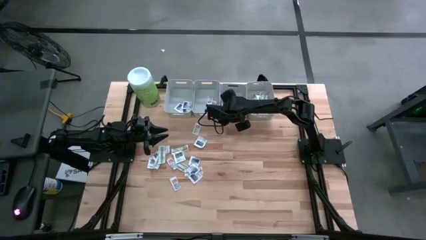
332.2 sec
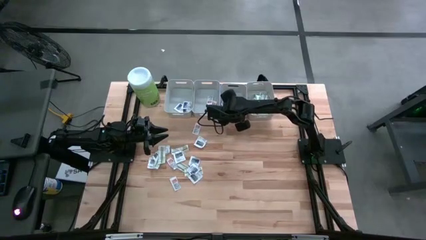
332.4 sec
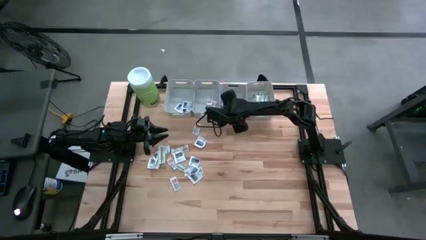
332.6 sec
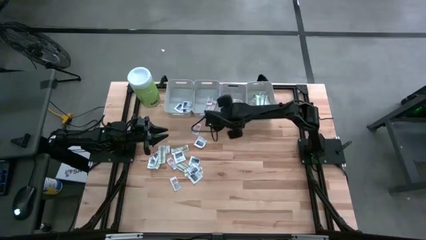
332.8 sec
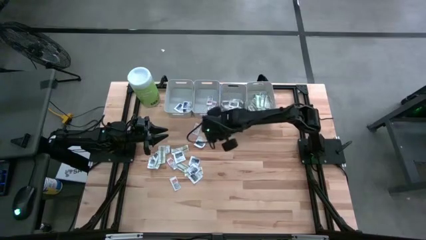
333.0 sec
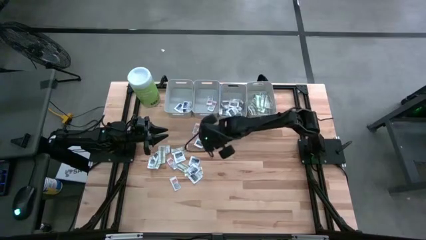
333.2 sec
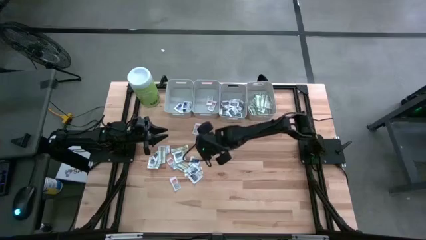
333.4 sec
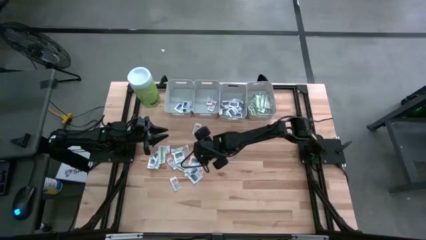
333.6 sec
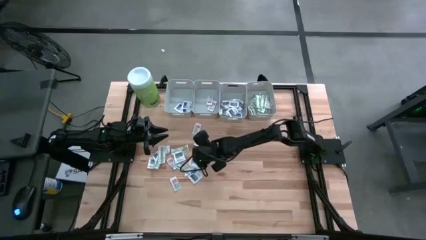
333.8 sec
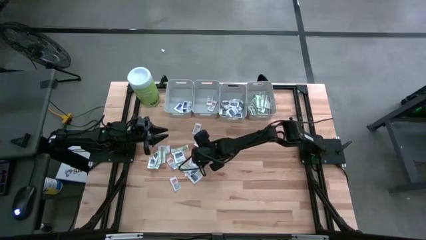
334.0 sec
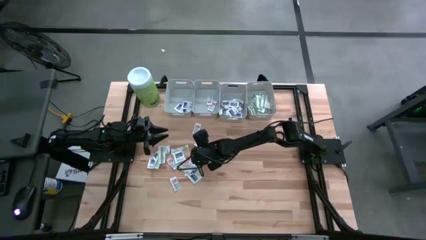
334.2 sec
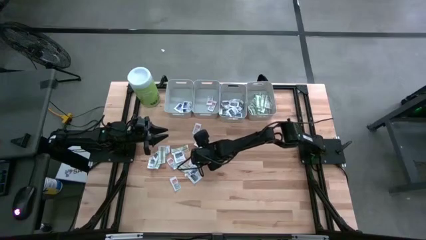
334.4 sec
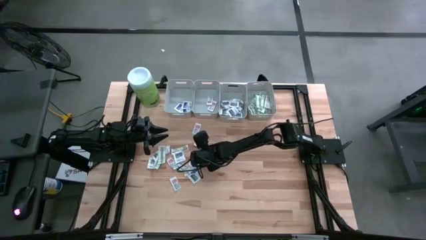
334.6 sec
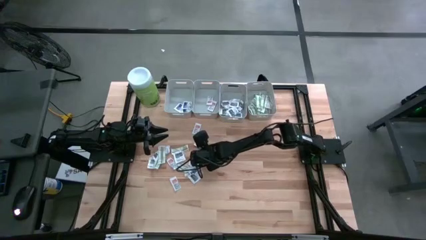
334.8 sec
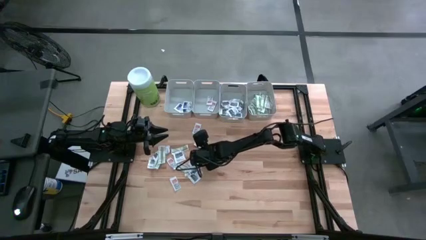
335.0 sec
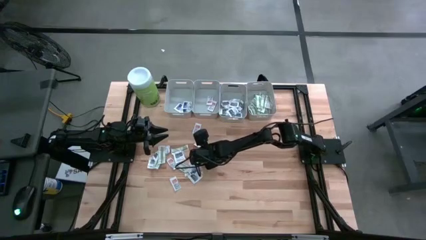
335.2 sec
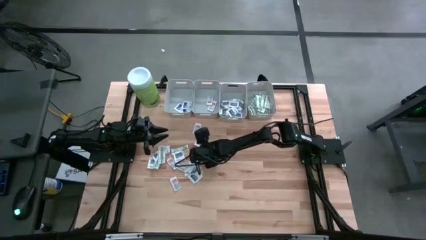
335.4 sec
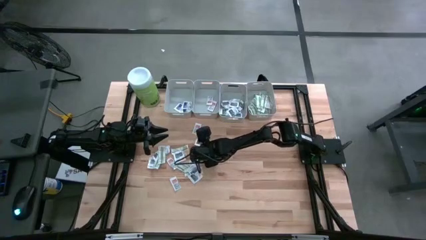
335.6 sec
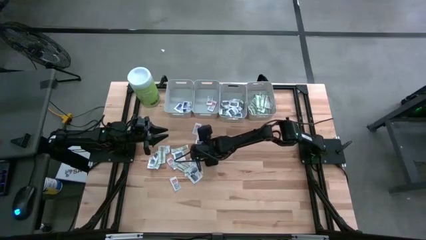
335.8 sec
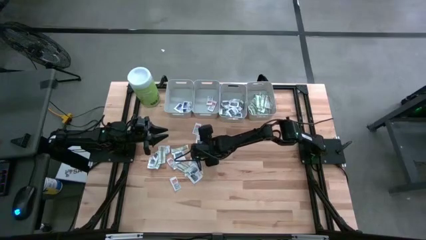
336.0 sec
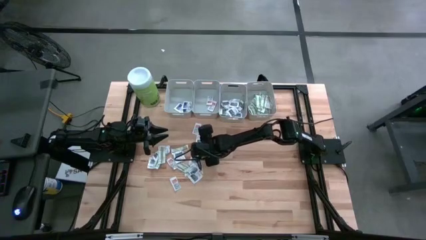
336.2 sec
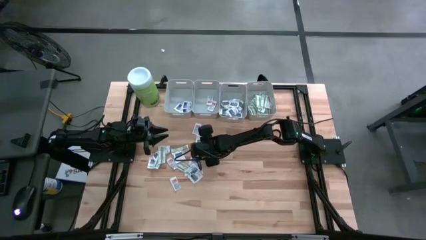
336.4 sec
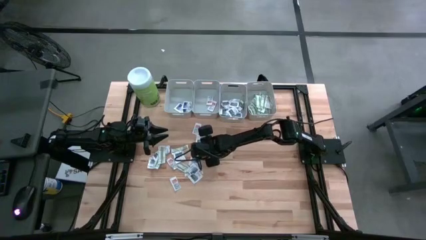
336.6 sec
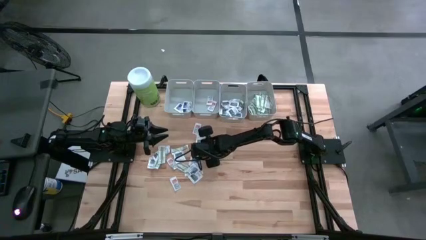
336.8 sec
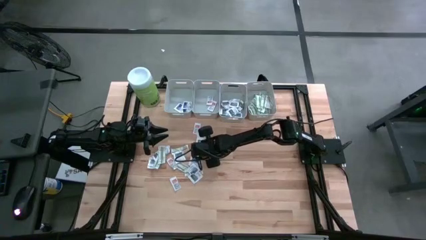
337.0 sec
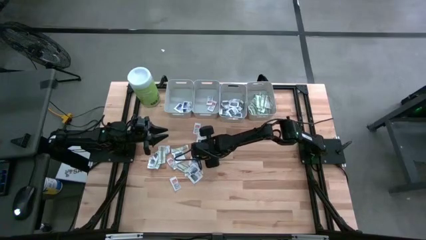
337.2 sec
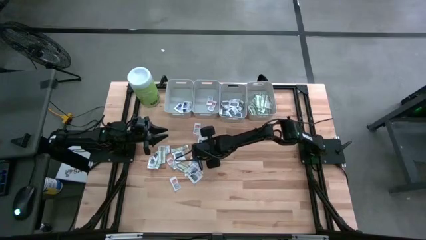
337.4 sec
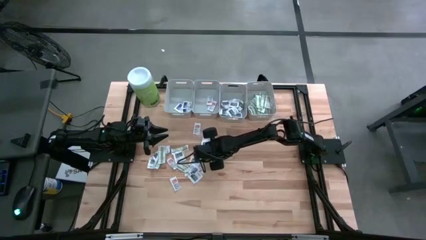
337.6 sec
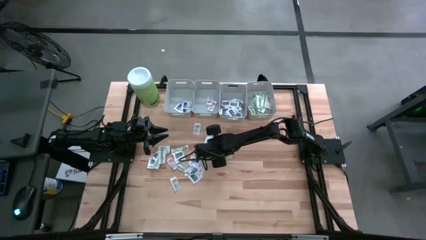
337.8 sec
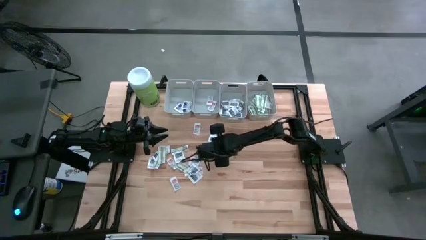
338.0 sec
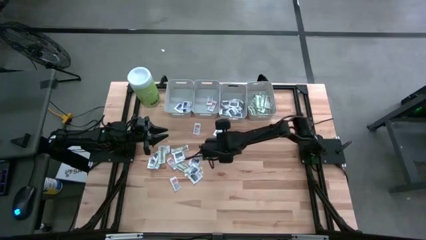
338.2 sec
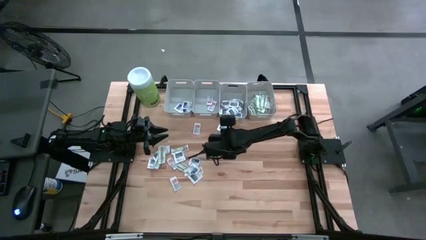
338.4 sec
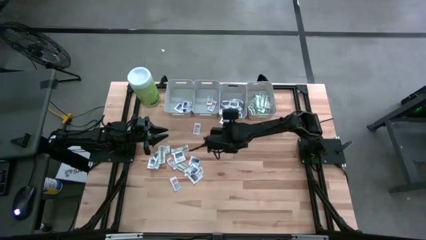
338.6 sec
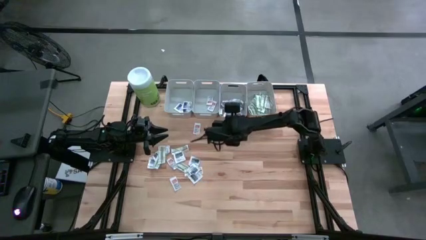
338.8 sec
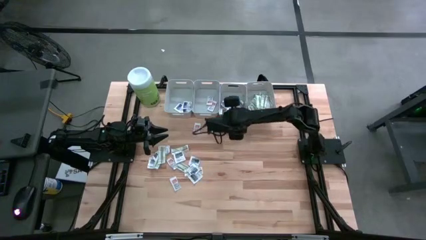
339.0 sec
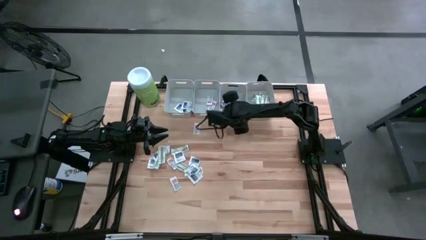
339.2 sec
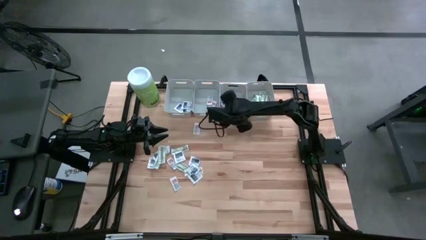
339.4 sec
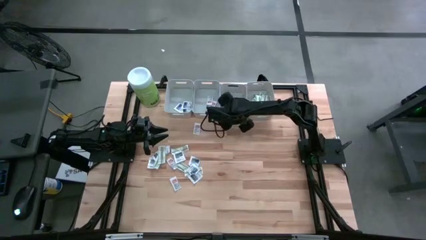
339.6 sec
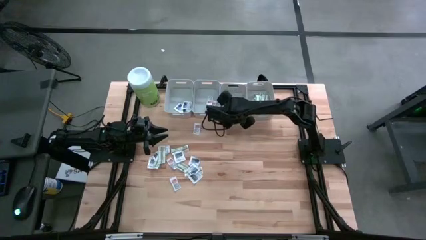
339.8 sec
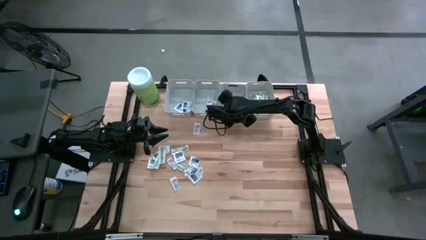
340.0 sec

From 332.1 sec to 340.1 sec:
Task: Pick & Place First Aid Supplies
Put the towelette pack into the middle right gray bin

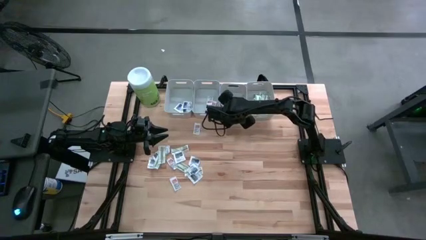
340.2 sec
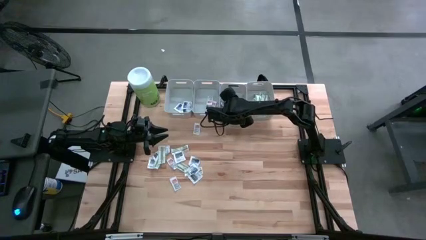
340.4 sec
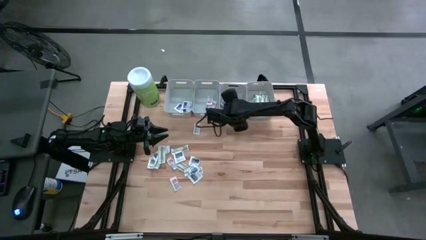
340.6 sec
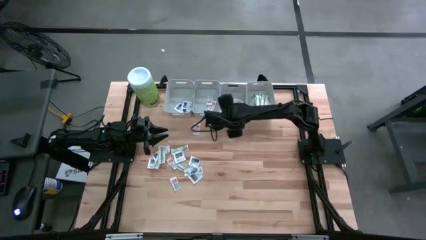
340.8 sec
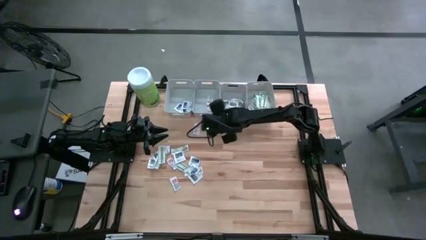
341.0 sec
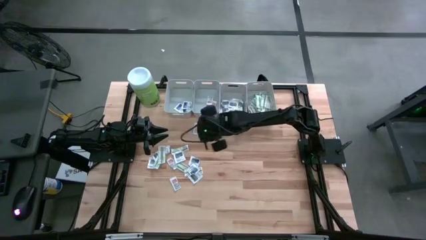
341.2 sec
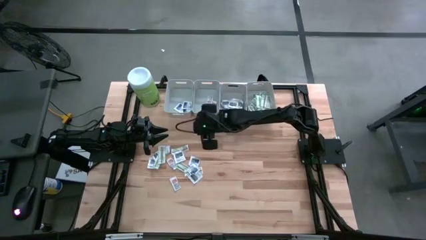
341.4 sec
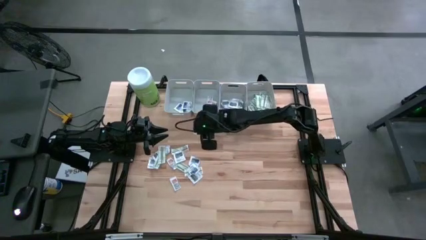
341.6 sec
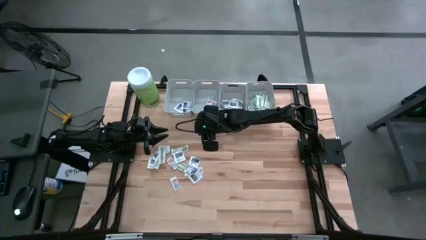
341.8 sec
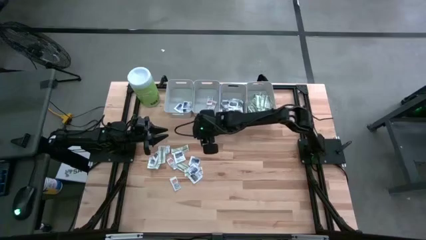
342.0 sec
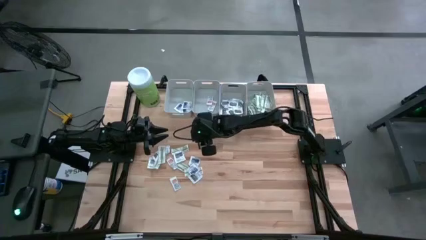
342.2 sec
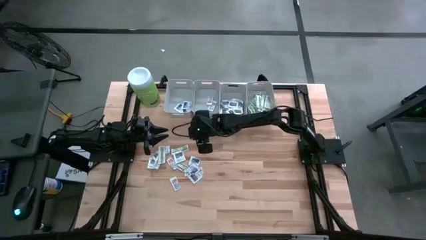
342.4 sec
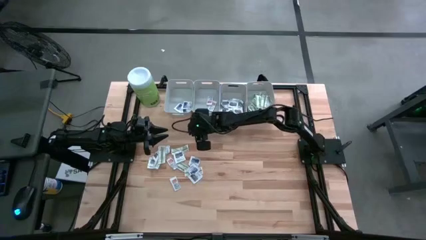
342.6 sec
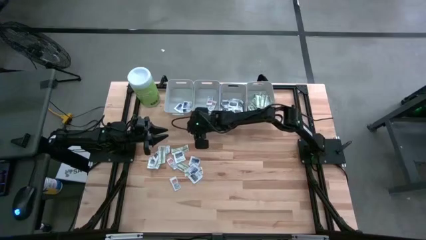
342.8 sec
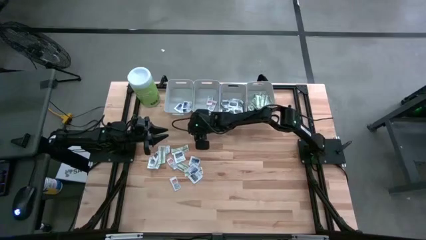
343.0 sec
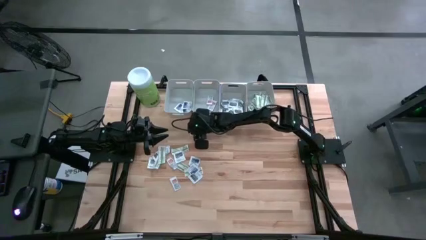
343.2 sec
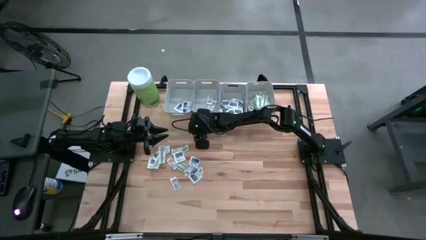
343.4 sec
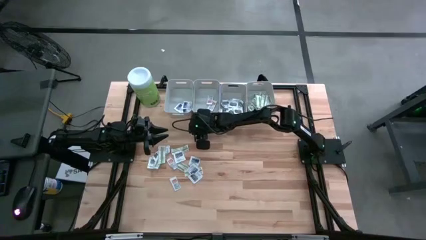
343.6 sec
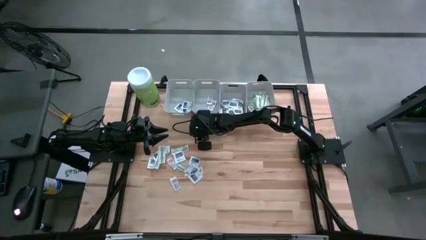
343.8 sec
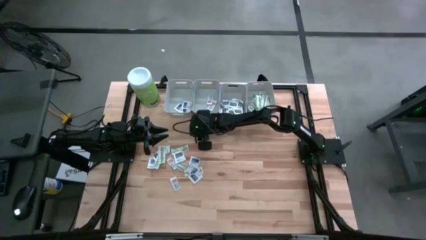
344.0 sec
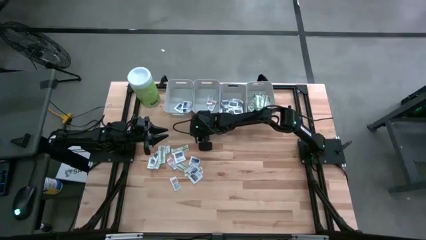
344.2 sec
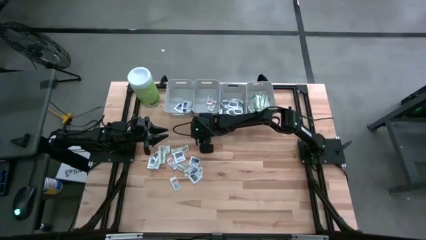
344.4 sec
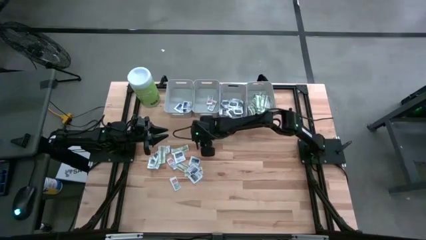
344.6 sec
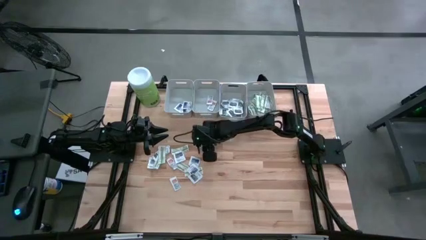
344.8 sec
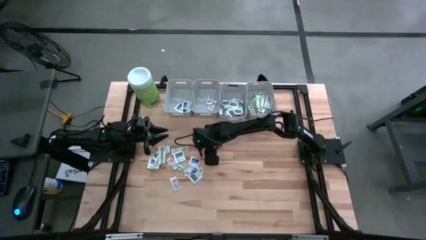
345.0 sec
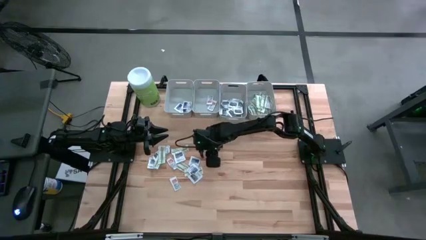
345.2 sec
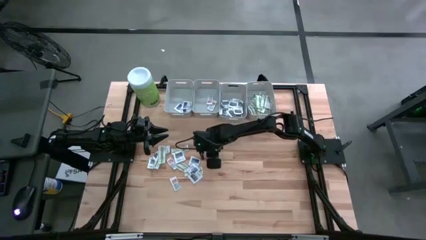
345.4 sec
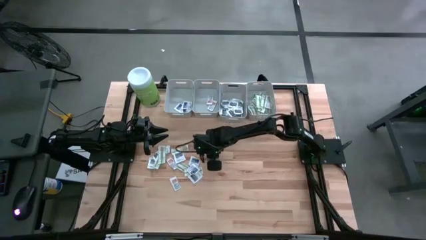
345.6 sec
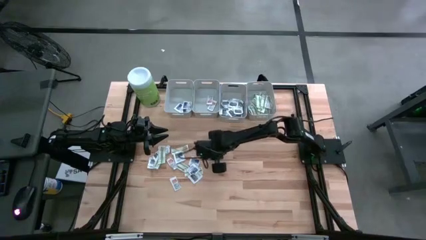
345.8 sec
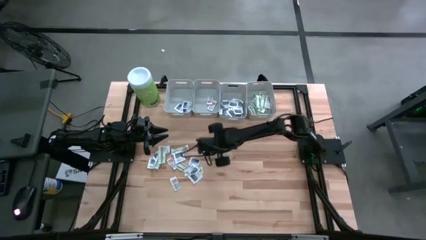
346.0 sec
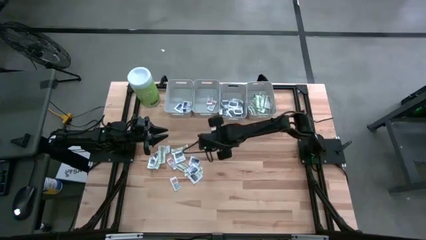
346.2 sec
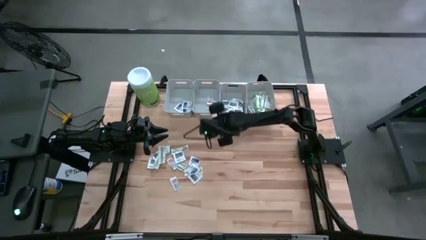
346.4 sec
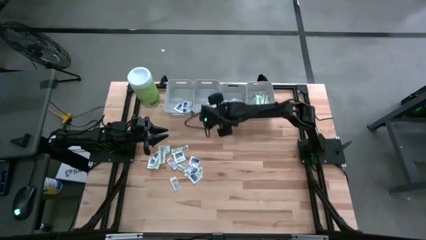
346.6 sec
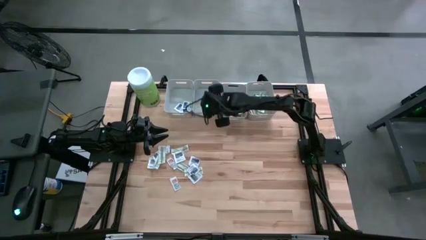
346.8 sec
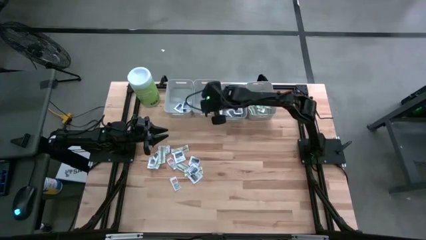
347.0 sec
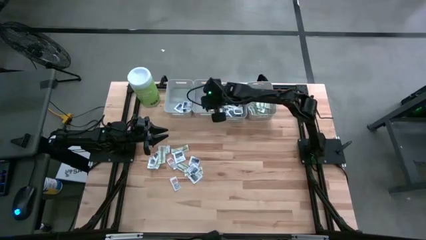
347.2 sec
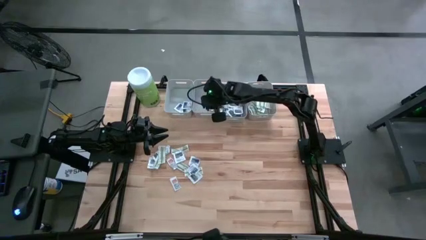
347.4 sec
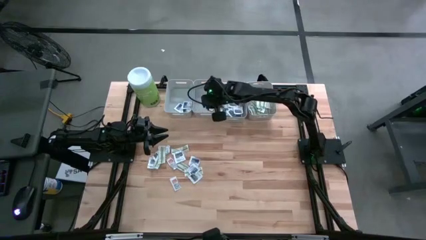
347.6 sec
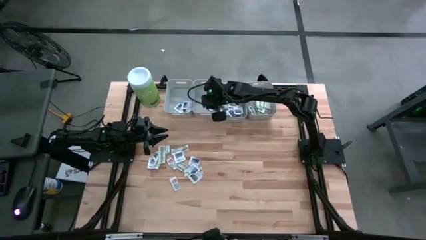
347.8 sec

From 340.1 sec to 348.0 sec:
Put the ointment pack into the middle left gray bin
